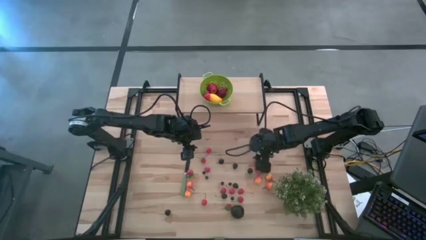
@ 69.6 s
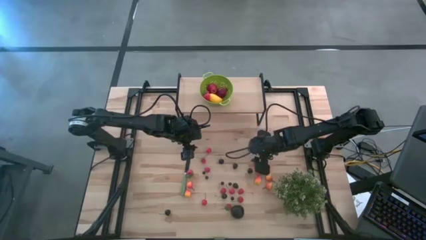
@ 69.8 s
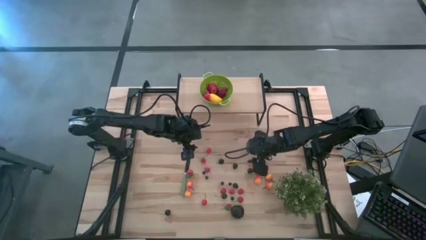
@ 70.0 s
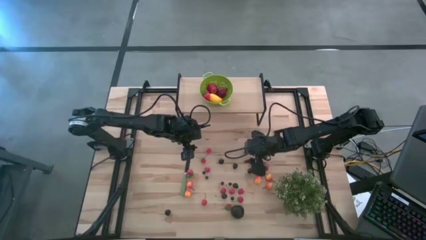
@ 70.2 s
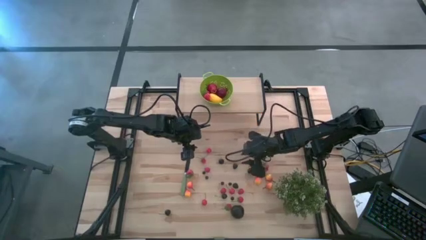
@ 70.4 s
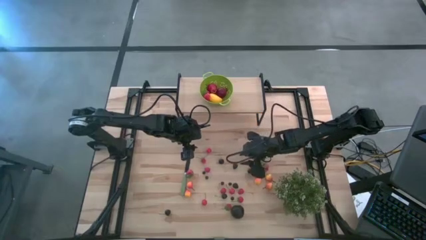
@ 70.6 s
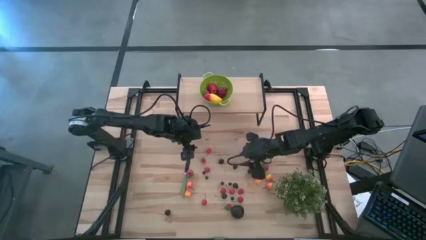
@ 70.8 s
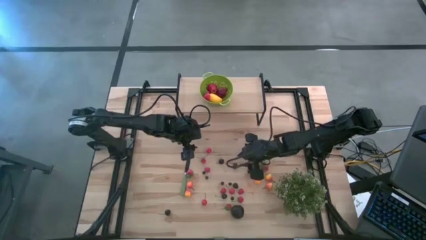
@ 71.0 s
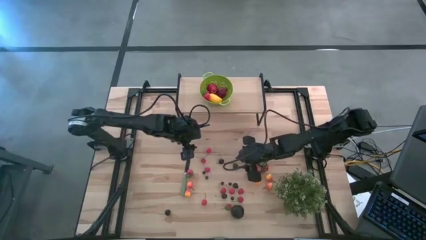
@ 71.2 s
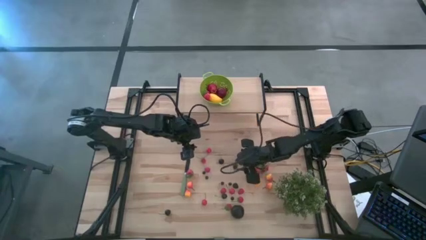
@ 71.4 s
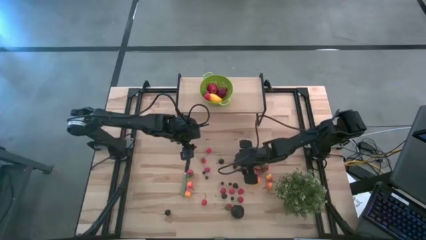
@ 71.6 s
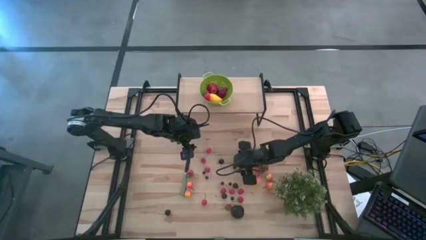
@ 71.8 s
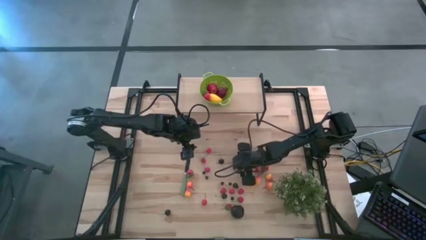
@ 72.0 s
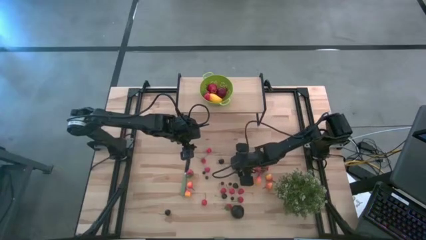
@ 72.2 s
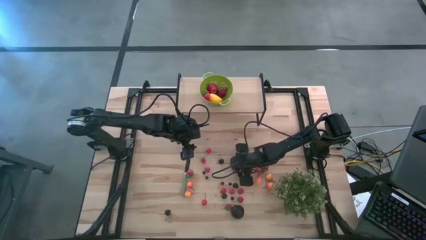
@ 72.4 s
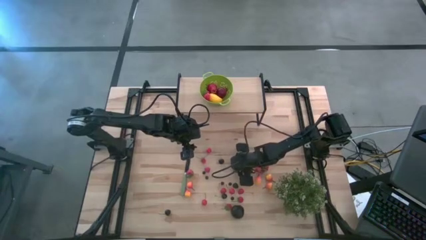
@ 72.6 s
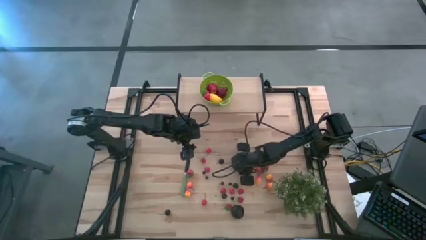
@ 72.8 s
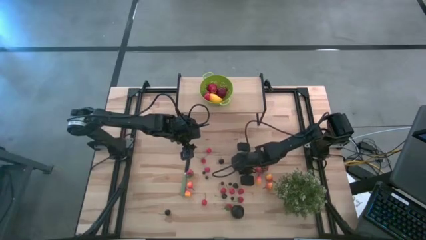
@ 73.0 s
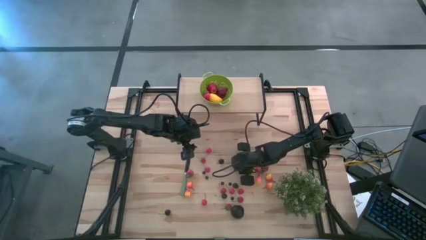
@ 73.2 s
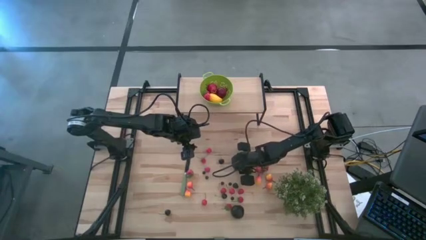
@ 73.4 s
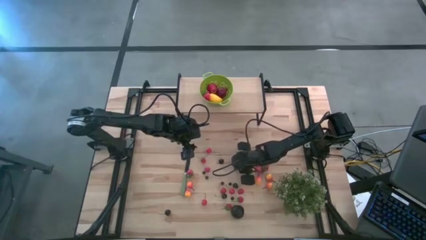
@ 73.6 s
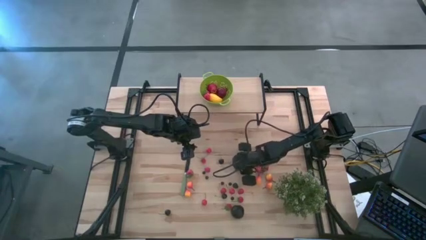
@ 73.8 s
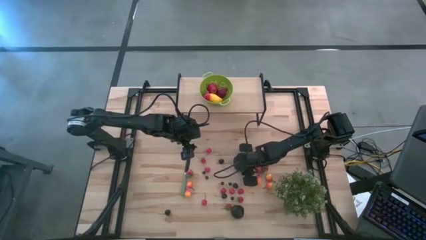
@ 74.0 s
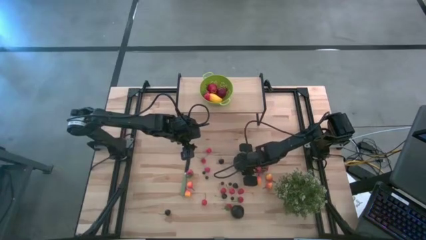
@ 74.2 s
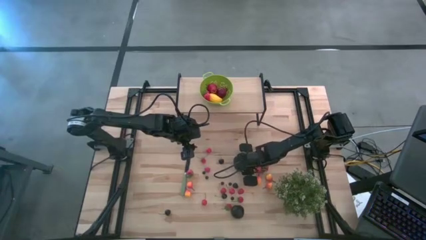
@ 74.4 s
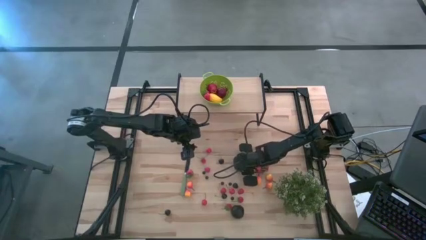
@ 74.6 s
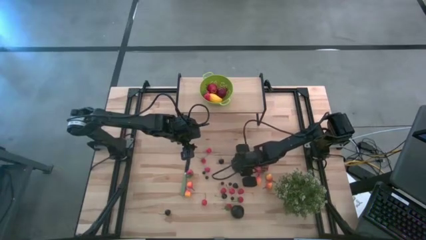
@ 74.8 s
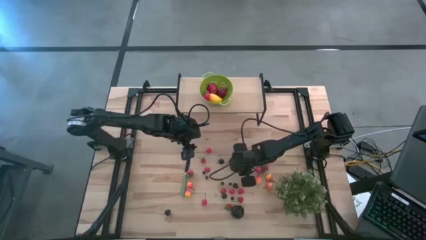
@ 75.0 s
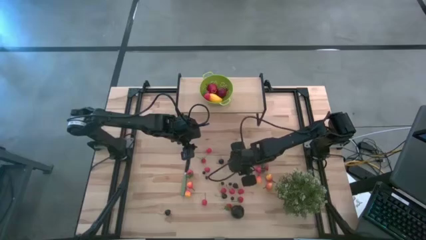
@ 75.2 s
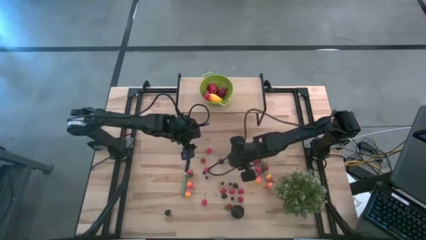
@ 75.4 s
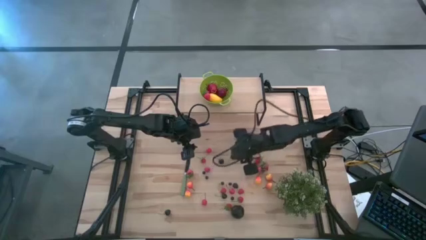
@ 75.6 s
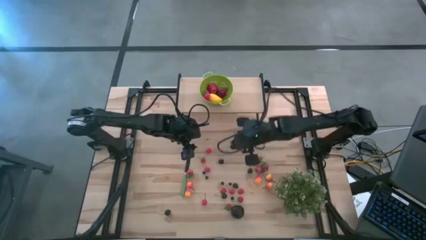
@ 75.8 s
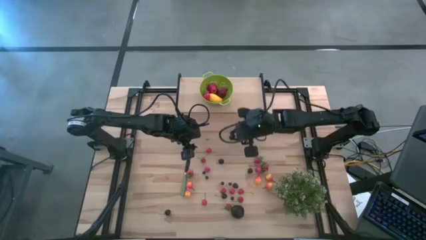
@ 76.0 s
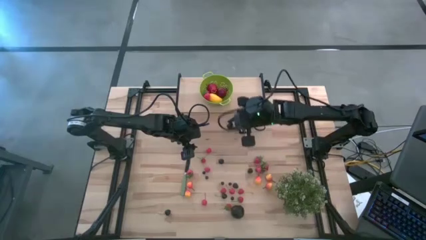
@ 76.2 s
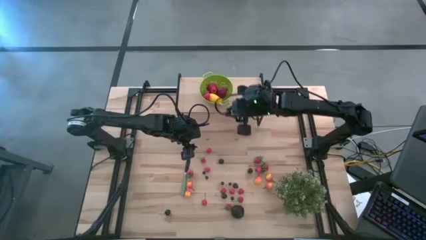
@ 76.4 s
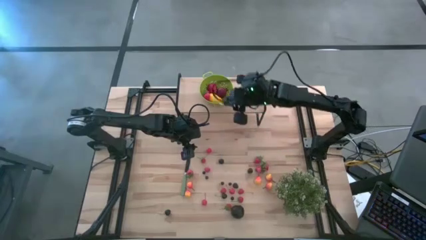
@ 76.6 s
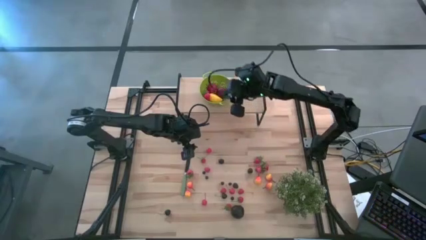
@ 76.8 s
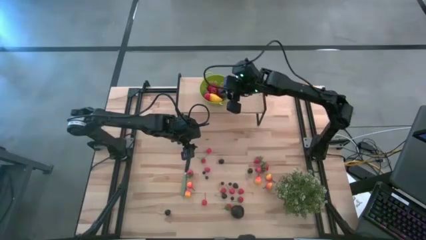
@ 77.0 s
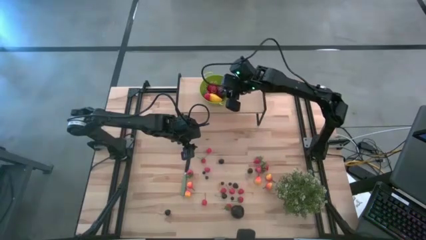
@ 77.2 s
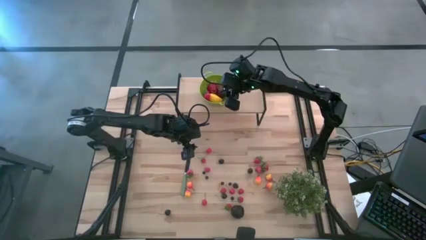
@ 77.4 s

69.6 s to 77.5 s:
Task: Pick & Place Fruit
Put the blackberry into the green colander on the shelf

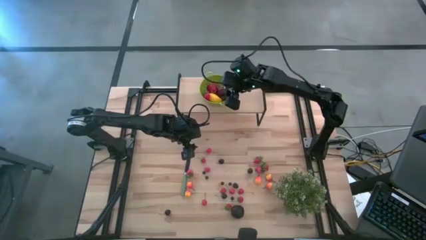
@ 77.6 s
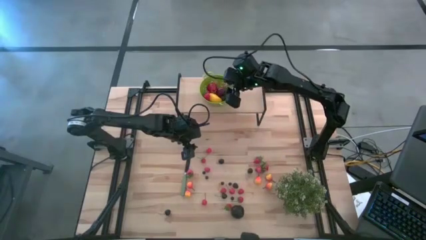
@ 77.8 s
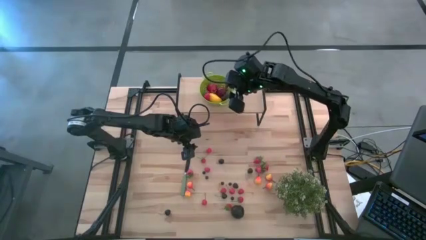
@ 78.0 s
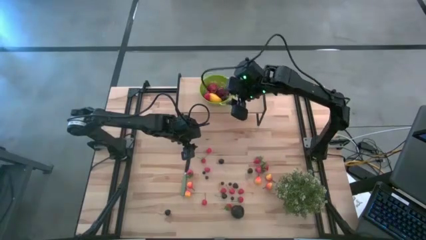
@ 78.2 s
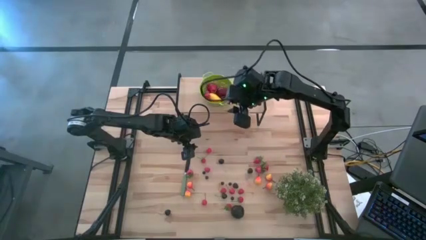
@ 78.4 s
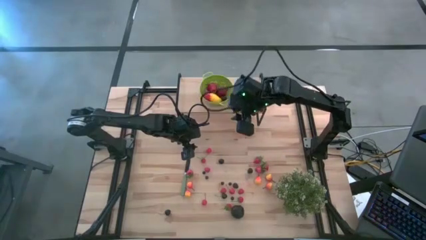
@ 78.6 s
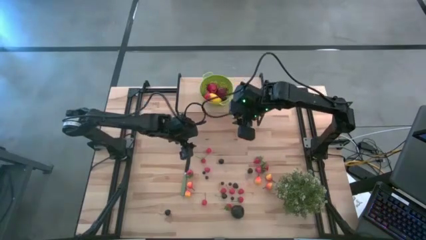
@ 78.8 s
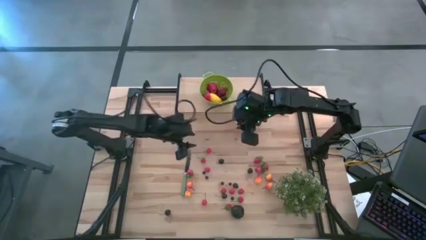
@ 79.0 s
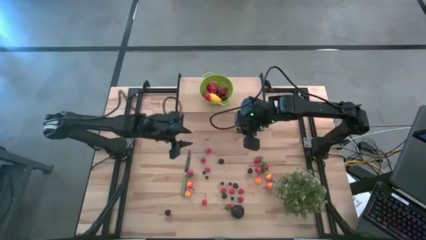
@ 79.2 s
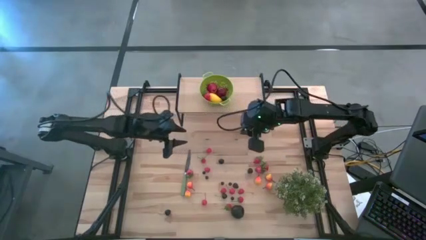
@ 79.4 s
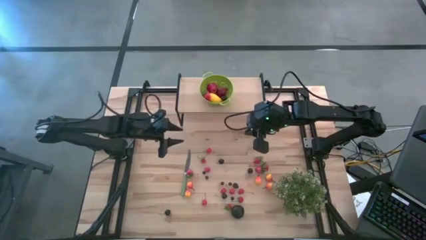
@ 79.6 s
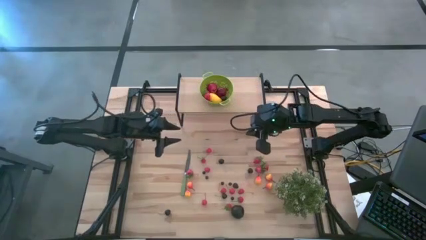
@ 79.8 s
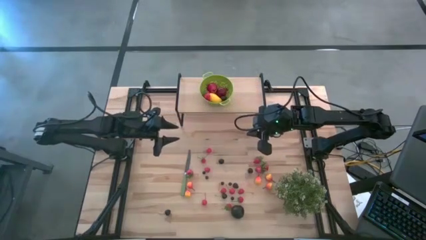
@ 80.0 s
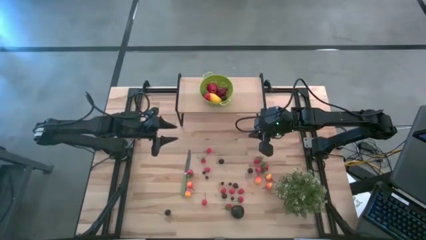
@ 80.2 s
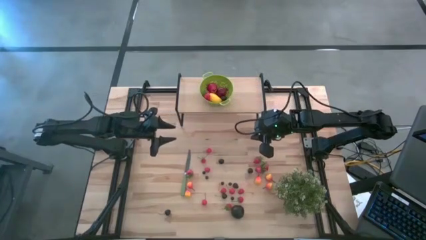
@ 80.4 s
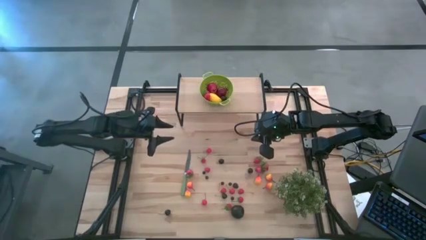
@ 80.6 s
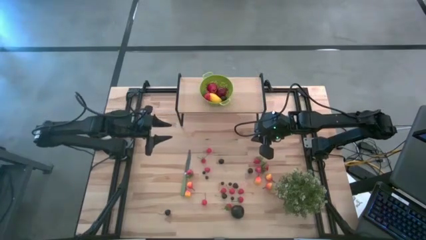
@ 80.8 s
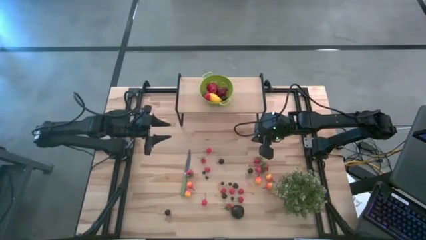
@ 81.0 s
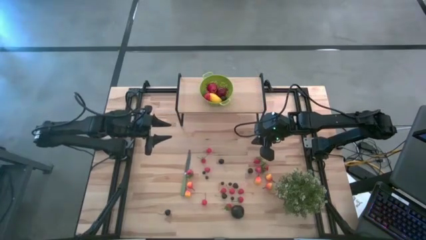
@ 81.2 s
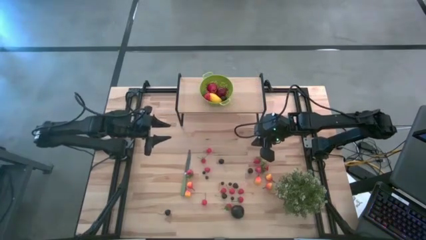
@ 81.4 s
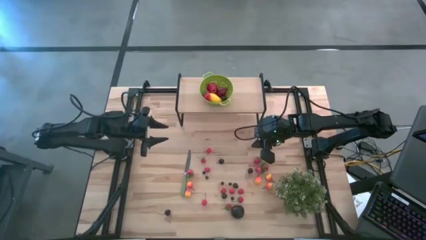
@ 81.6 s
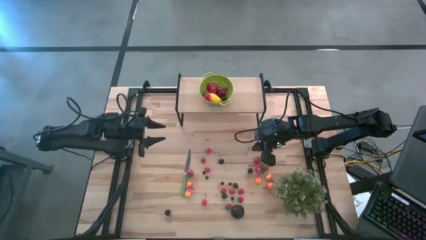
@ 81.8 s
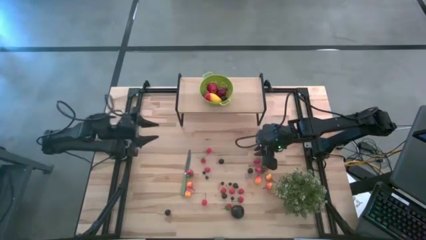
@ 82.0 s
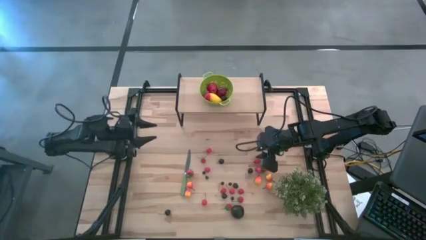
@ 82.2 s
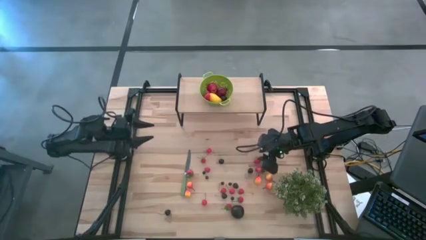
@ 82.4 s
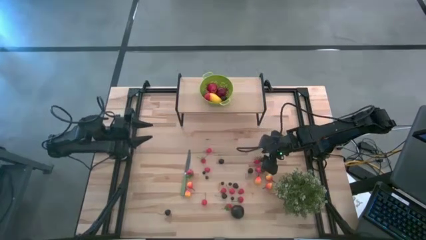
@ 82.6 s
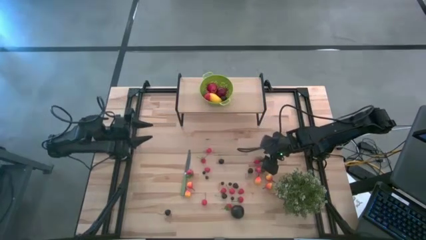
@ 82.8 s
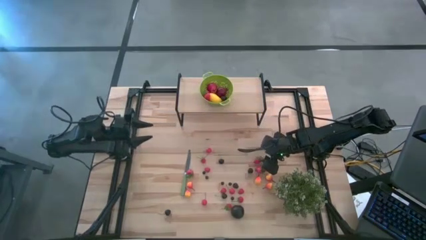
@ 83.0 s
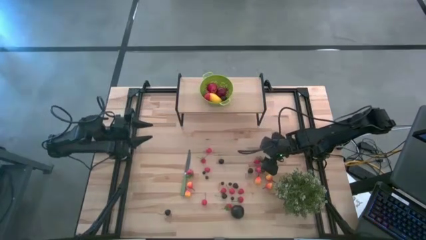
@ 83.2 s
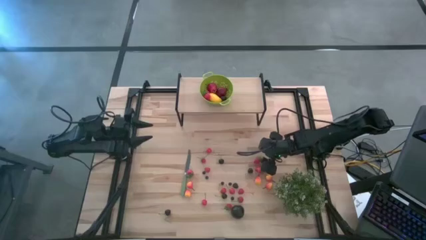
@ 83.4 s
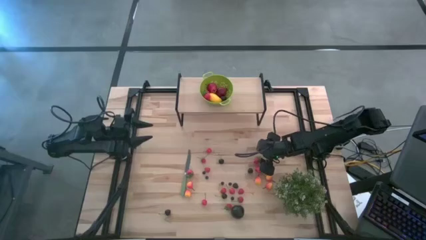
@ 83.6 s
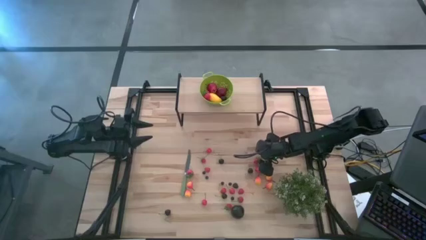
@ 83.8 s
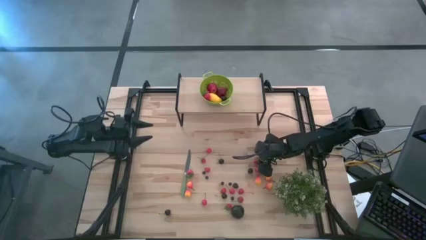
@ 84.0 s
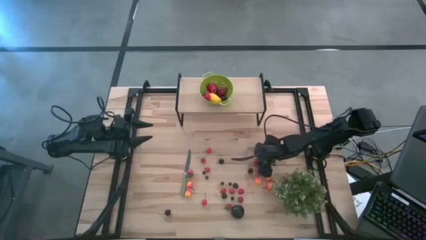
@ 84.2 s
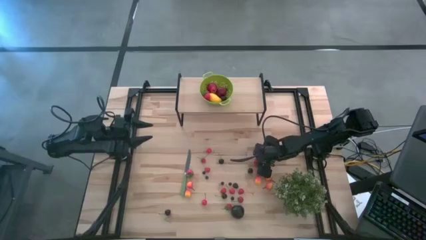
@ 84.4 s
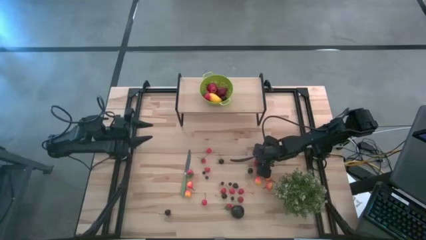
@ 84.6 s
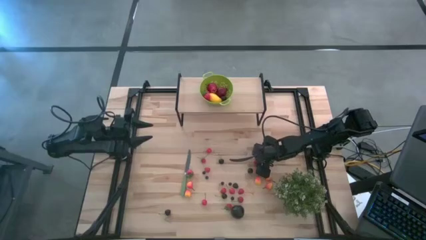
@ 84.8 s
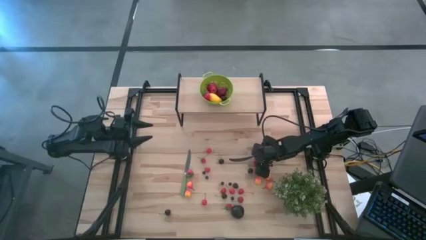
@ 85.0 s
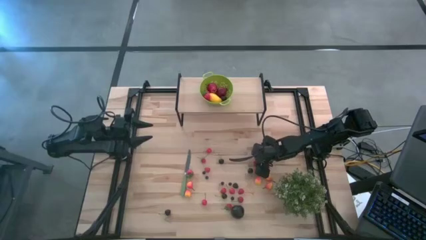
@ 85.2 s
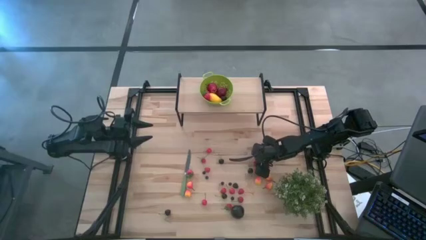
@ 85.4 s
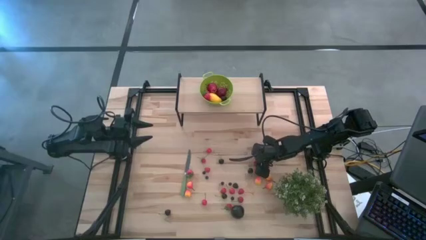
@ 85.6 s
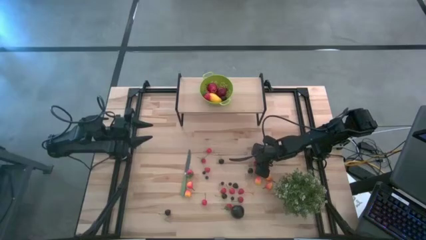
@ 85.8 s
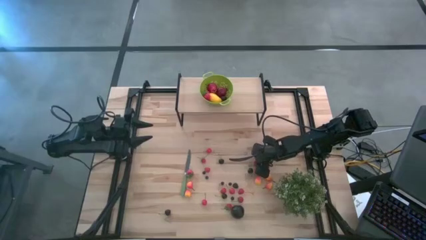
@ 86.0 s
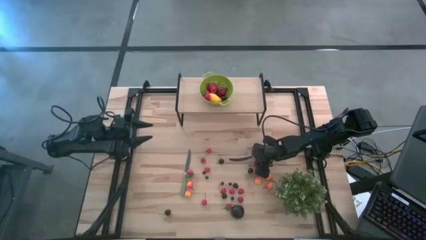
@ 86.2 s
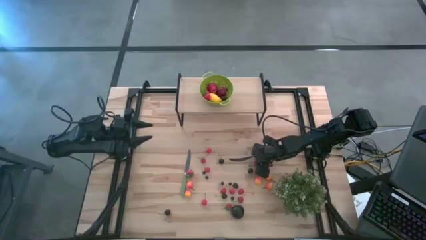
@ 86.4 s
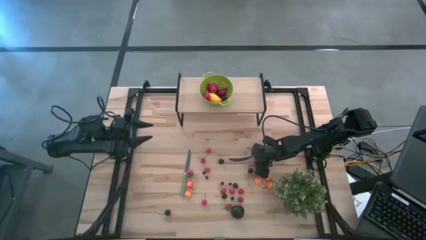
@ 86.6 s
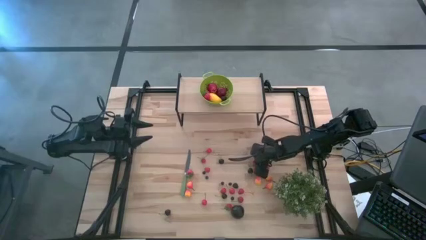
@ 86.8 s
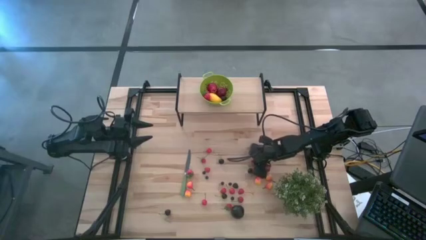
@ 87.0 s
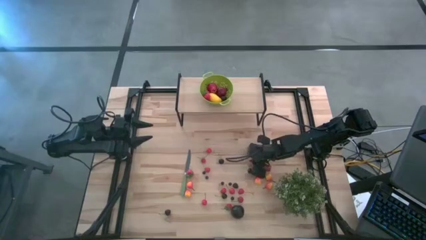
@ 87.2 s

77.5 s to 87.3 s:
Put the strawberry into the green colander on the shelf
